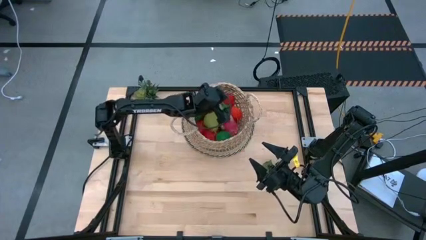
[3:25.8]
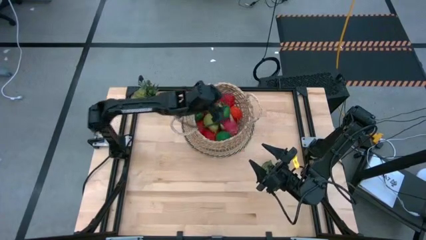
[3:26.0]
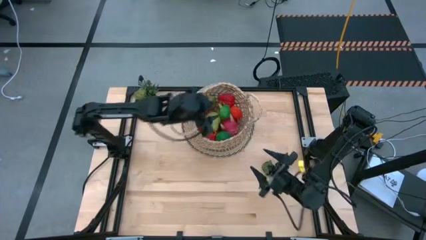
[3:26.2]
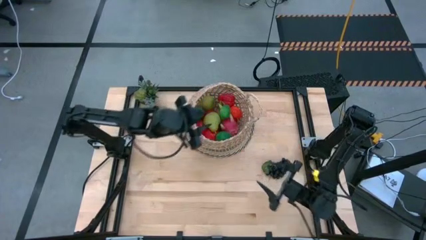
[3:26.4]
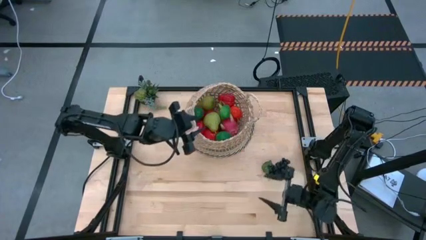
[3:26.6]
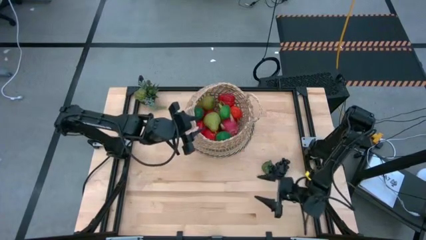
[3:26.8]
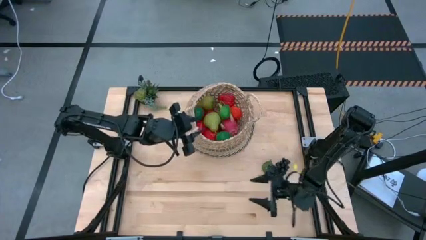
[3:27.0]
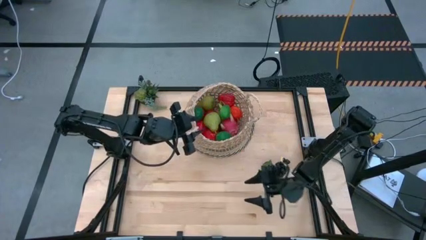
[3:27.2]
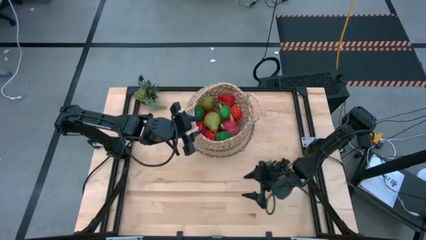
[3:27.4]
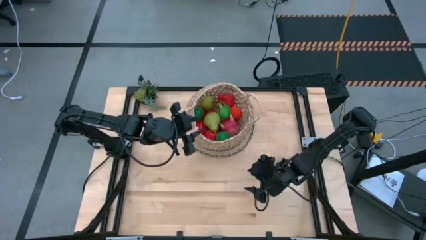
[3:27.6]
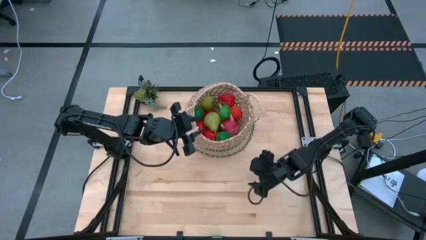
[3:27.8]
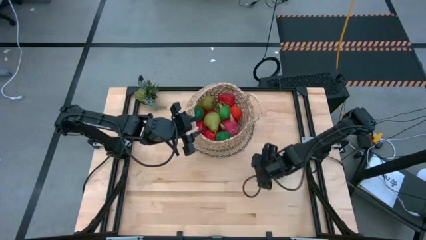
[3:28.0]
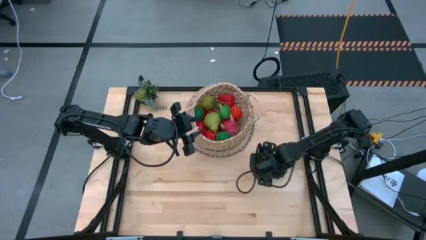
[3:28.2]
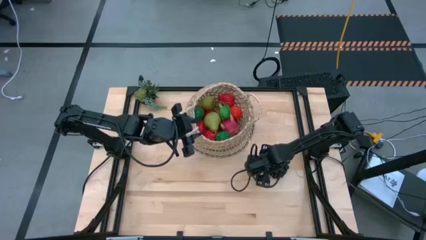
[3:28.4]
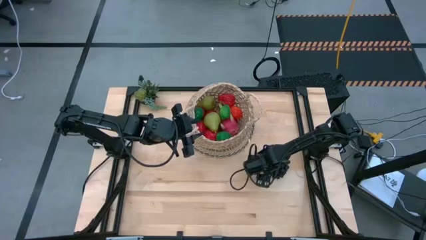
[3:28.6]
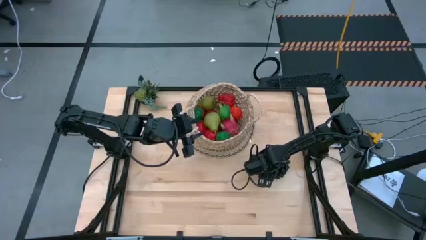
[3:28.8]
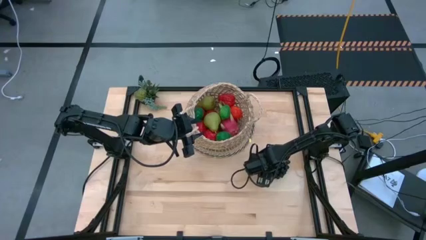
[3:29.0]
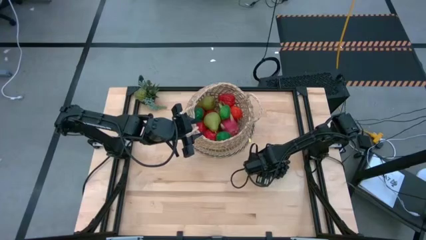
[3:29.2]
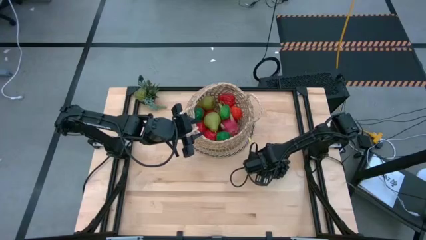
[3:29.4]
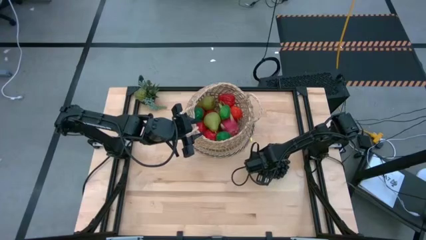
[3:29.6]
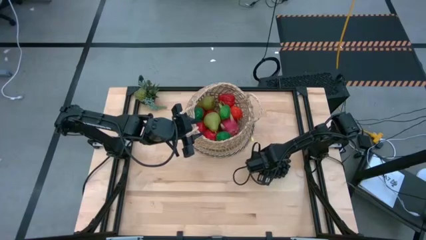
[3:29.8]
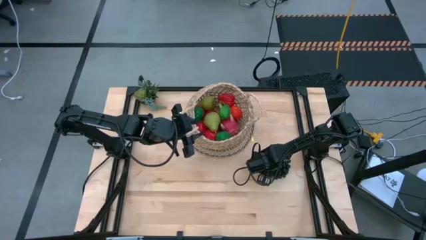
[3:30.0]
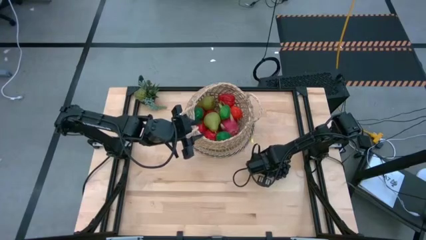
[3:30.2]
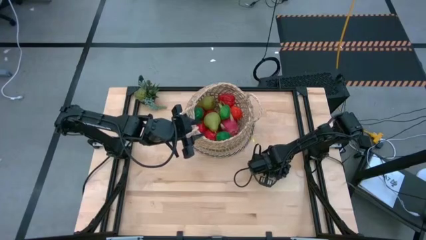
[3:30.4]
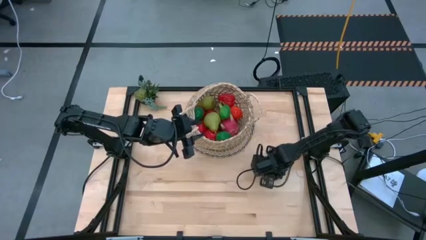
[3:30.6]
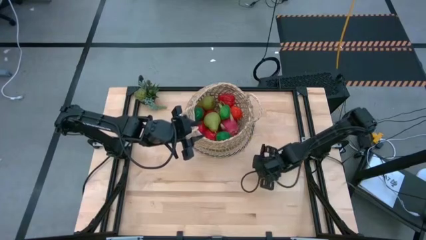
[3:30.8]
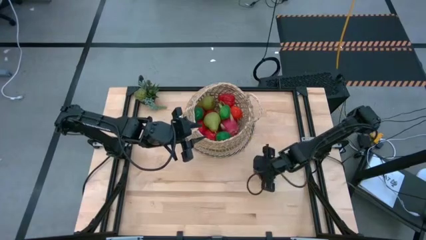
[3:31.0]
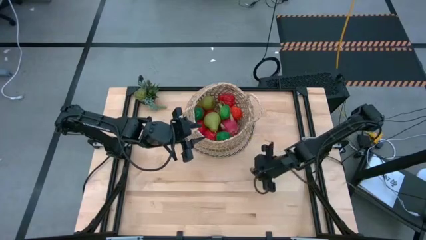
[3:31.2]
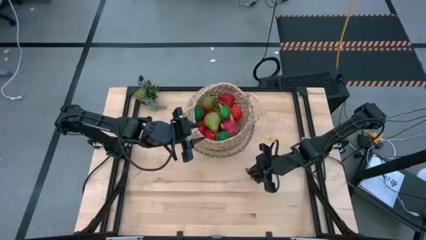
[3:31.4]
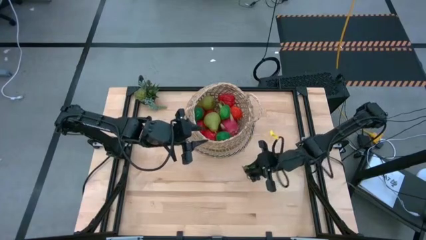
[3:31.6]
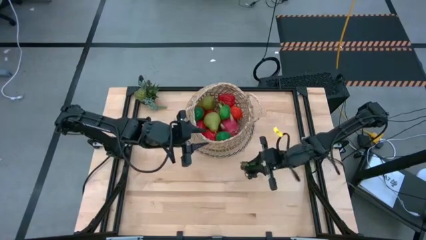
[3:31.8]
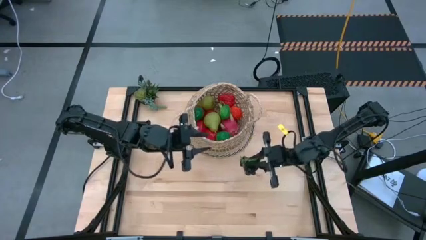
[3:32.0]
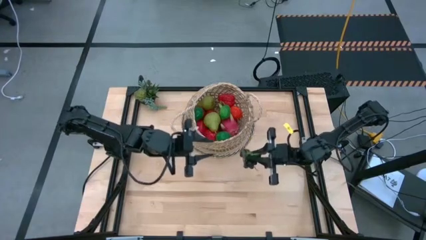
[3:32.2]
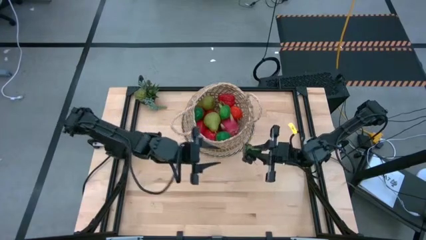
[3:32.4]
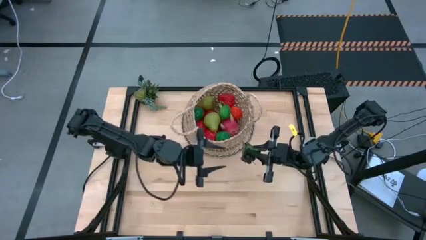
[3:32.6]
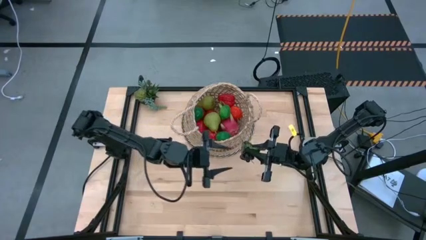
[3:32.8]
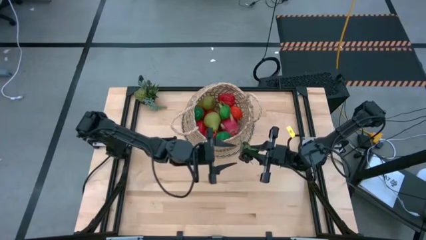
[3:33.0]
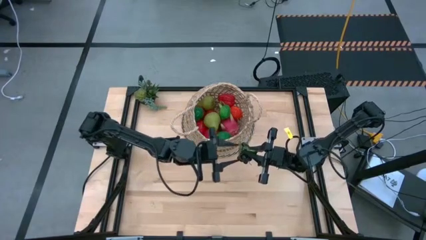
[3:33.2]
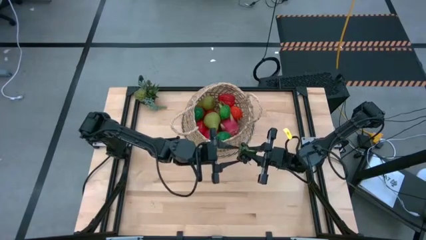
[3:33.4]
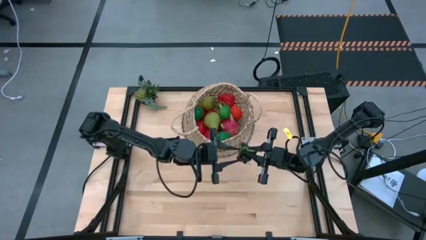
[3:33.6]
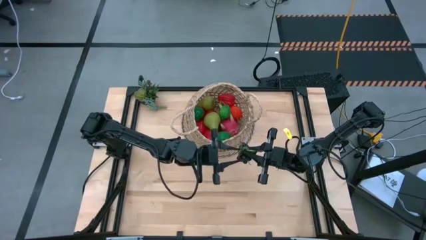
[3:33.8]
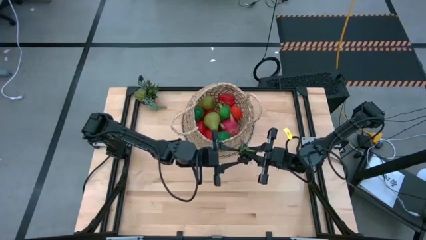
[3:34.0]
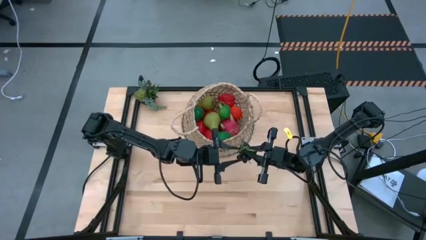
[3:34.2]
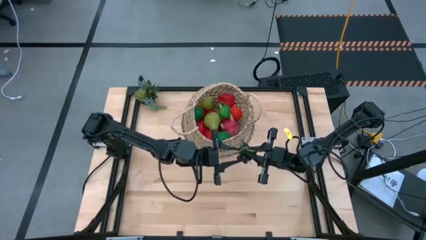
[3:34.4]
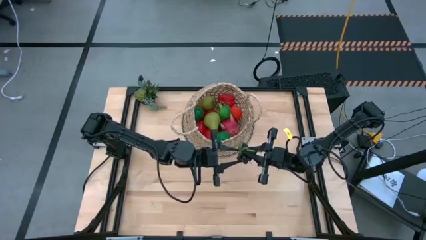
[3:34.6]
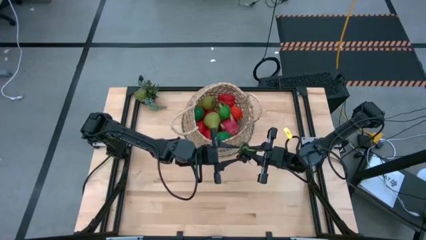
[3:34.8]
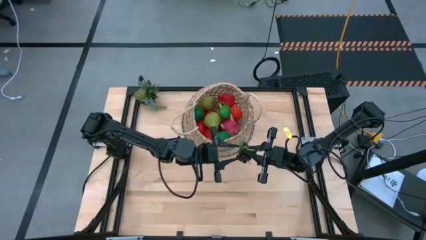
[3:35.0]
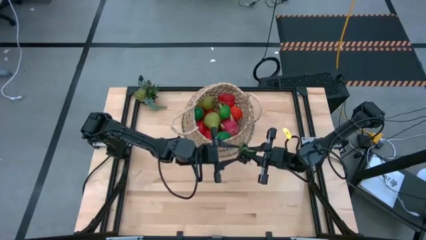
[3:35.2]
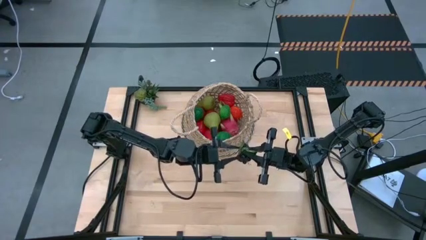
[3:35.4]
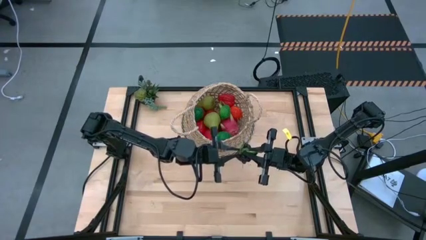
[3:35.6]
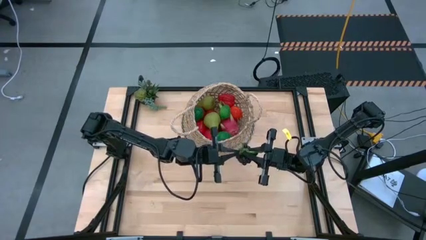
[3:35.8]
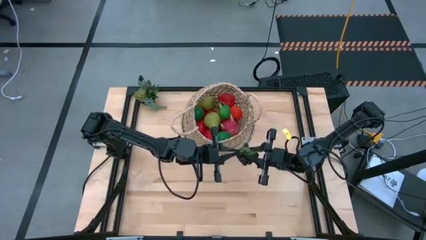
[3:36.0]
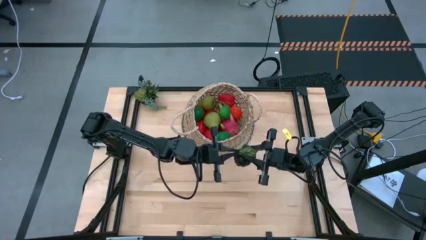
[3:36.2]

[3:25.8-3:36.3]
Task: Build produce basket
Put the grapes into the basket

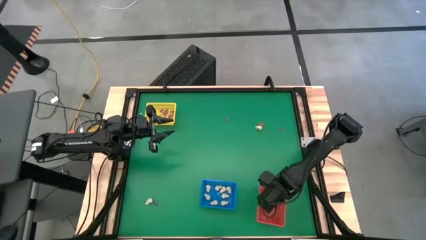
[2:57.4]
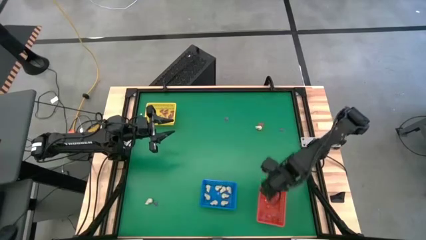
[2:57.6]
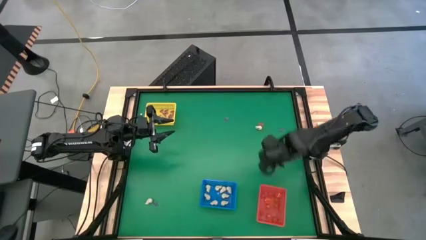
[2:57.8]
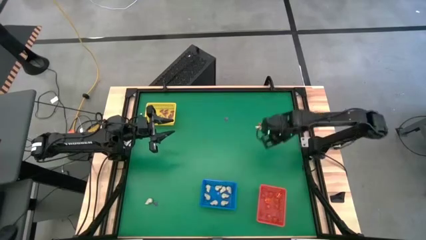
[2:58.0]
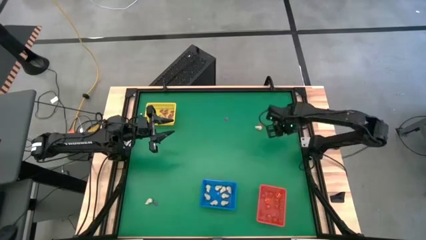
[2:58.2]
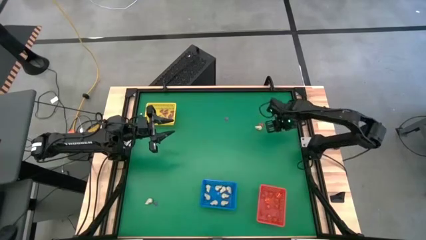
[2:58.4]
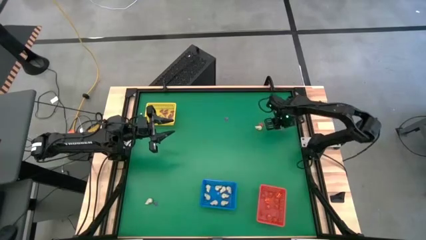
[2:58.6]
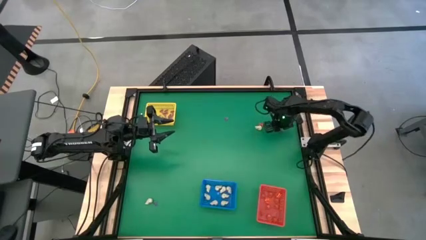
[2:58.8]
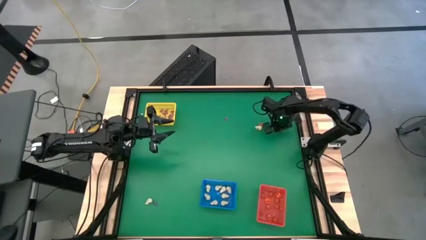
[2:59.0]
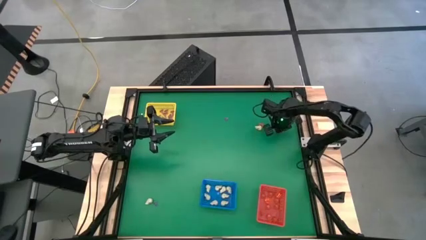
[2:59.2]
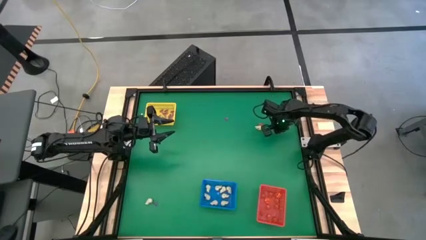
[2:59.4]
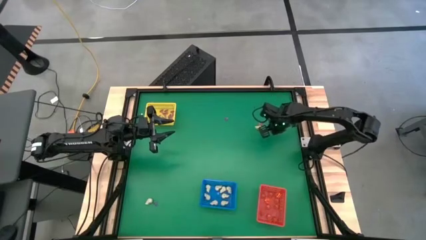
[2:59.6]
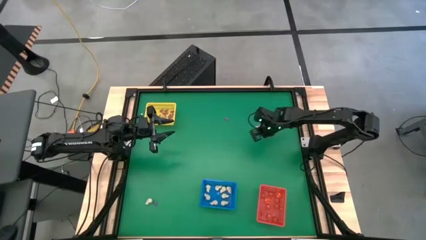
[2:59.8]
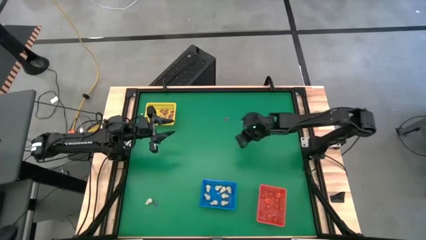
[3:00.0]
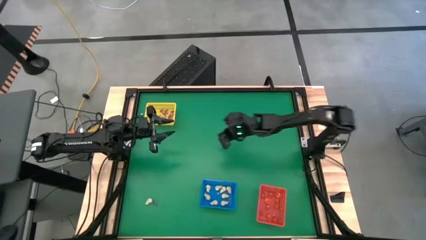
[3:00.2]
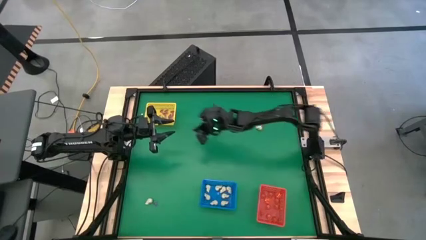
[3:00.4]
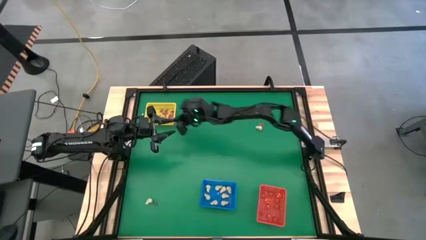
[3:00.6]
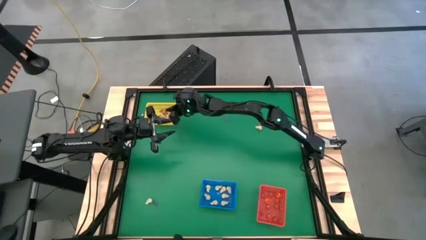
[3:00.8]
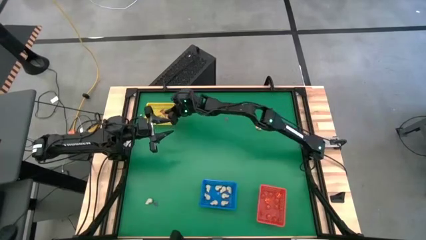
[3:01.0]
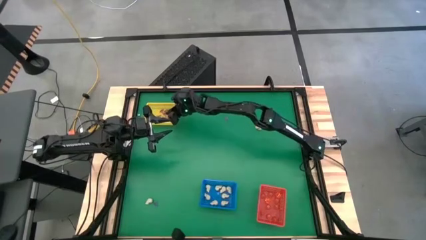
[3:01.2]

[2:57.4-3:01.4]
Task: Sort Halloween decoration
Put the purple witch hat toy into the yellow basket
